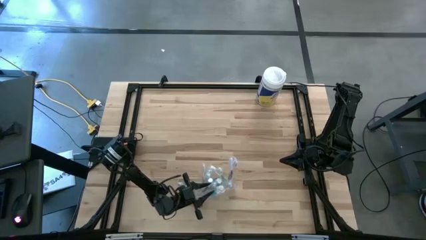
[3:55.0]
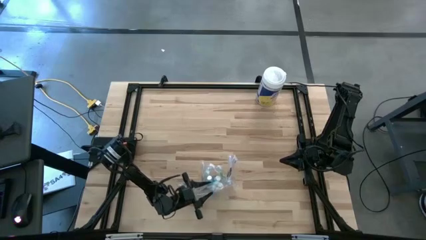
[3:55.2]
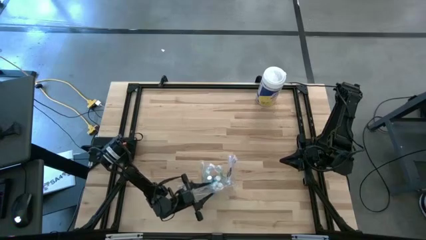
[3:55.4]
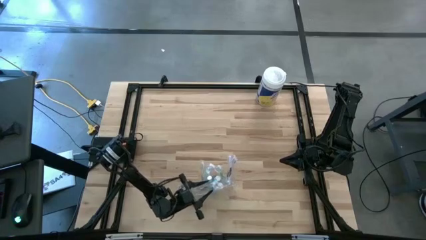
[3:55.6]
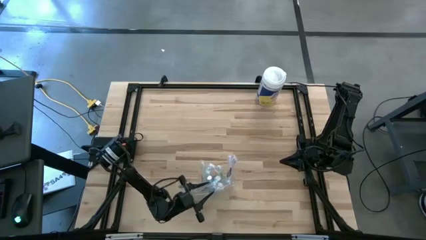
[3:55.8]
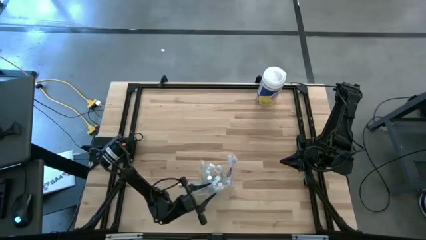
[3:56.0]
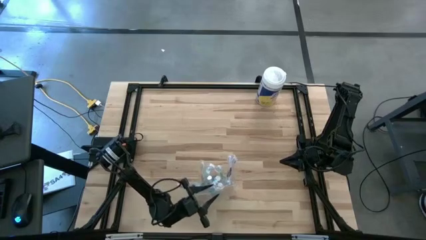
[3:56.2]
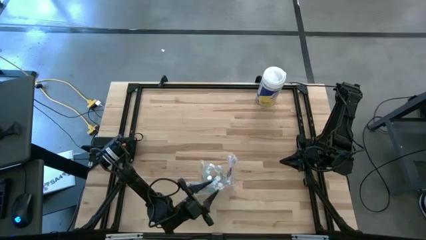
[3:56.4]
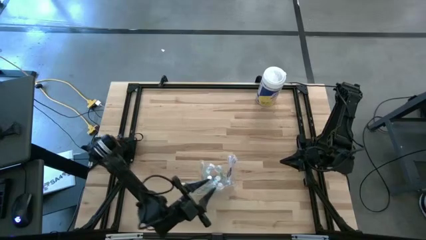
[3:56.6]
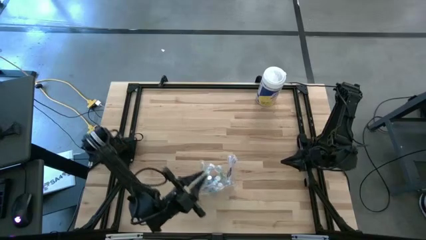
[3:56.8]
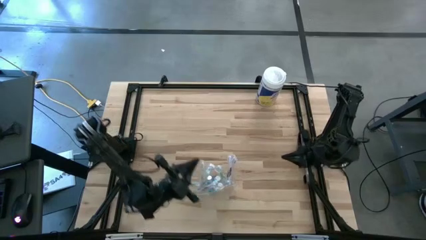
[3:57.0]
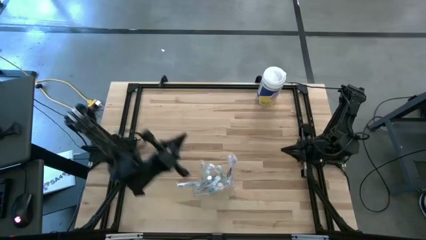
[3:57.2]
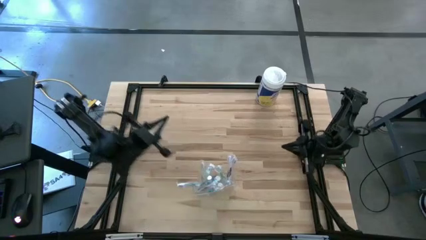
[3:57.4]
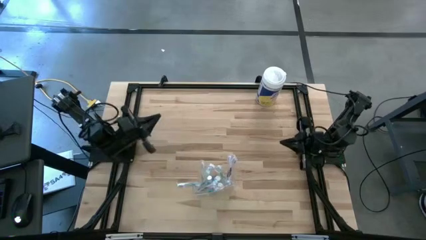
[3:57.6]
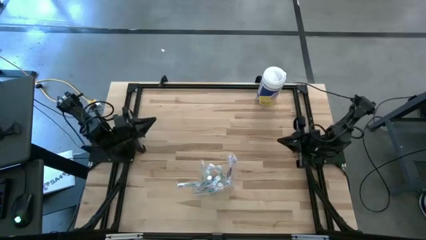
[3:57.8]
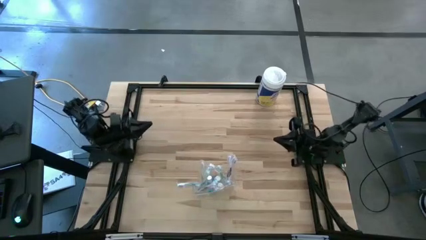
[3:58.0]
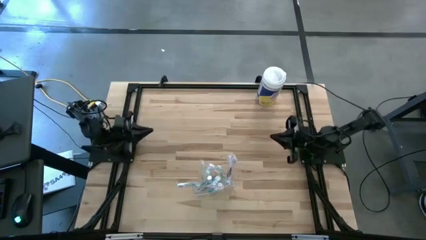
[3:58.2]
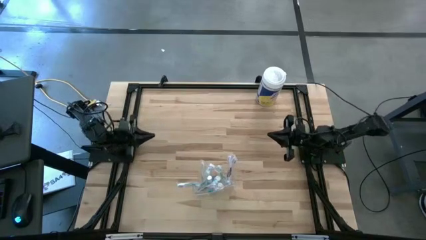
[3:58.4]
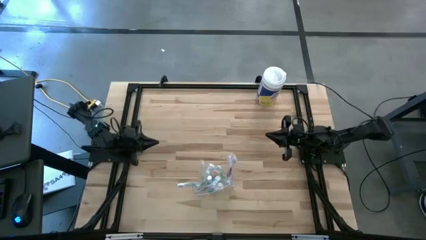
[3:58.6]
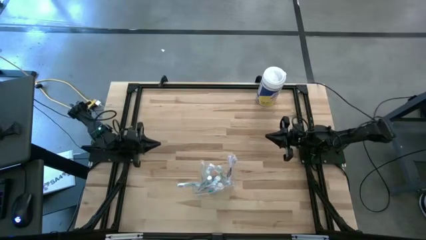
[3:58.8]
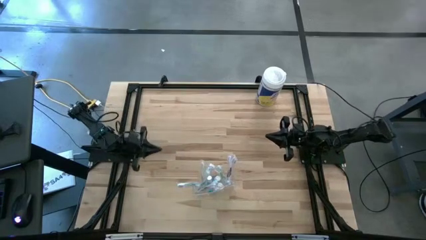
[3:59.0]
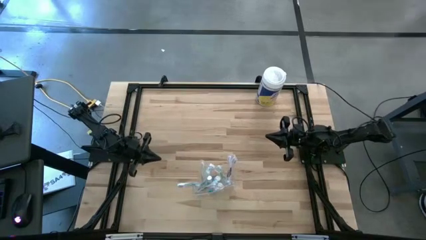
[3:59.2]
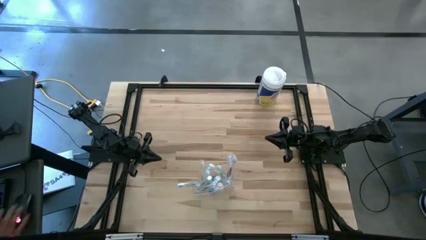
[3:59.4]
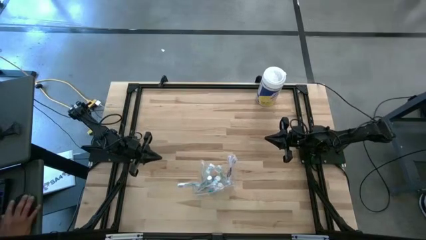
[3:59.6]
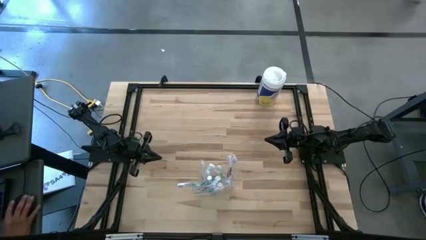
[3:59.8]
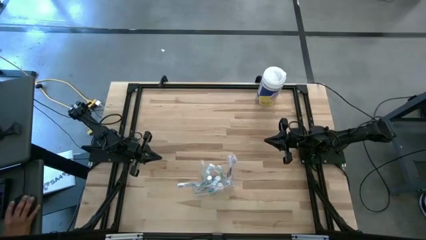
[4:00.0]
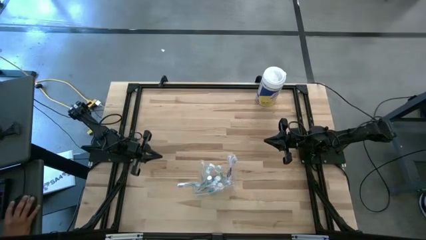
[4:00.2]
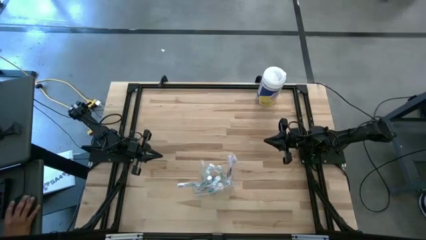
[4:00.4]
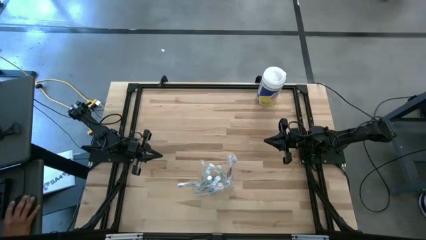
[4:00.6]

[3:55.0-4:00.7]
Task: Pick & Place toothbrushing station
Return to Home Position

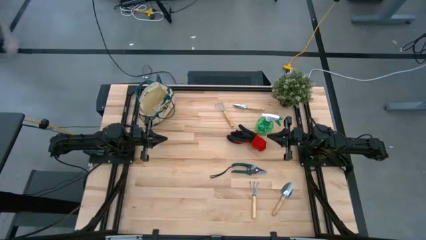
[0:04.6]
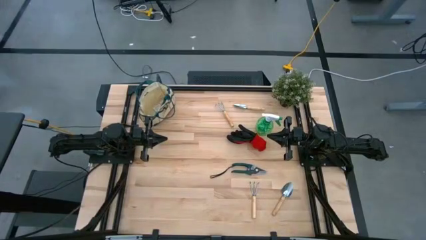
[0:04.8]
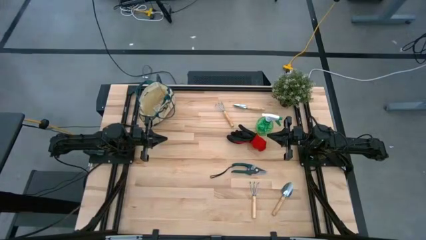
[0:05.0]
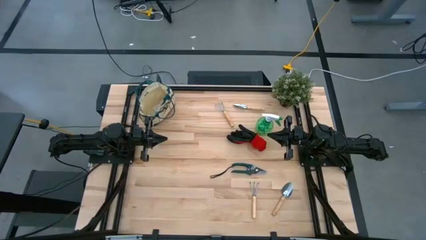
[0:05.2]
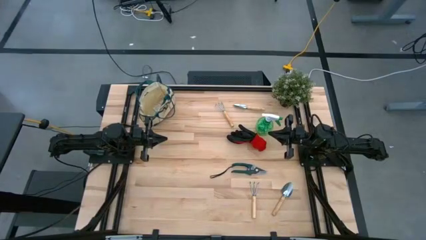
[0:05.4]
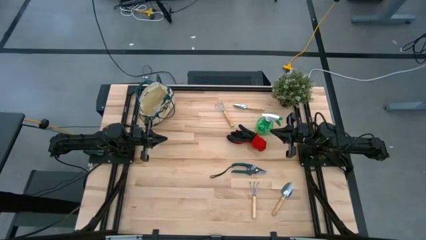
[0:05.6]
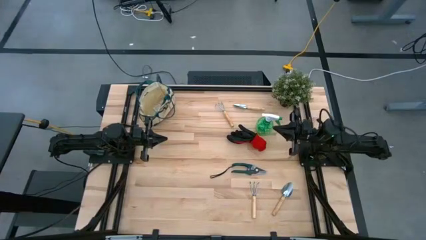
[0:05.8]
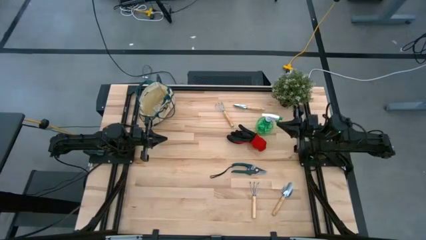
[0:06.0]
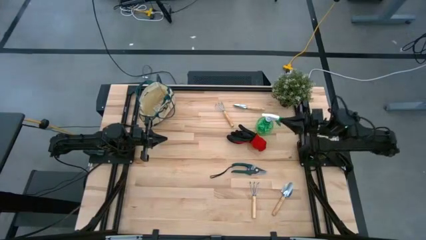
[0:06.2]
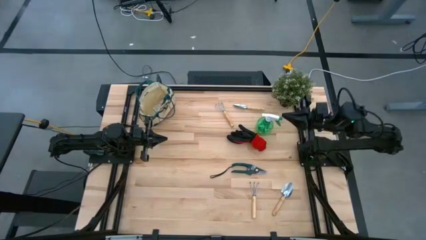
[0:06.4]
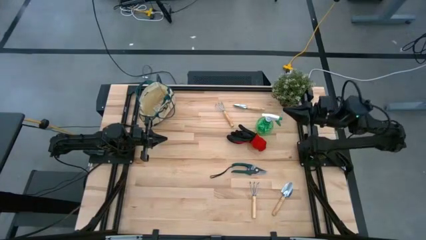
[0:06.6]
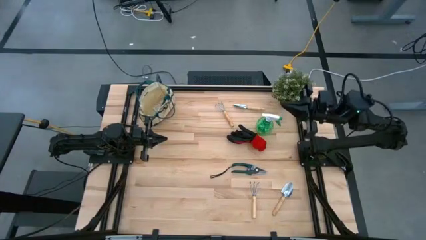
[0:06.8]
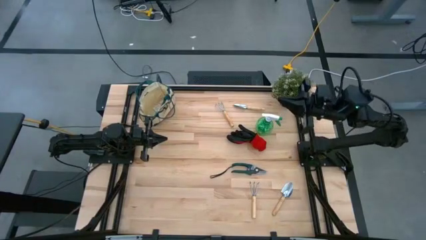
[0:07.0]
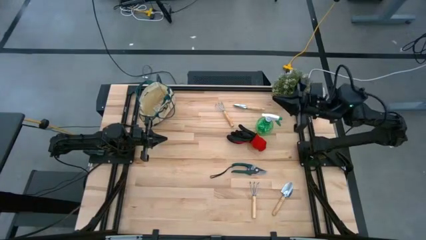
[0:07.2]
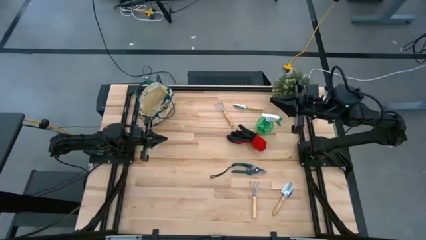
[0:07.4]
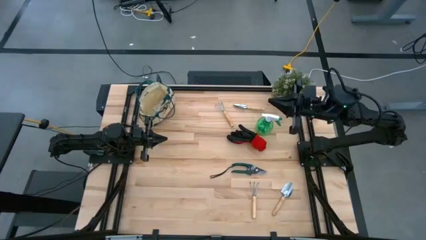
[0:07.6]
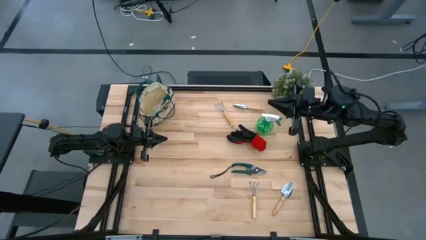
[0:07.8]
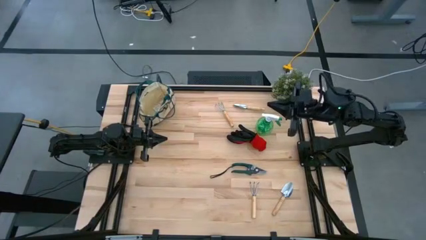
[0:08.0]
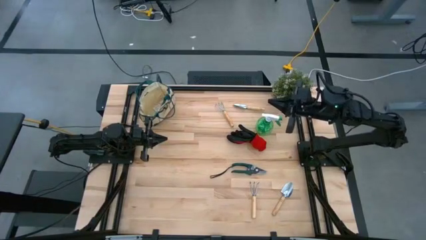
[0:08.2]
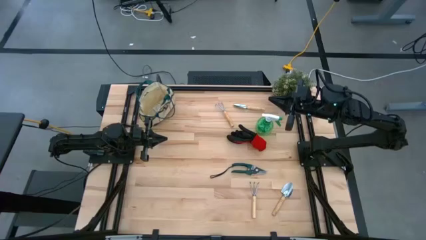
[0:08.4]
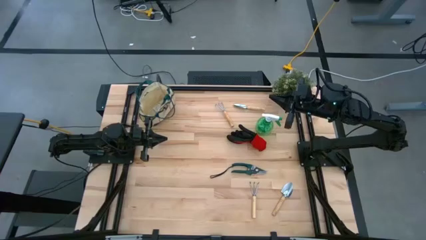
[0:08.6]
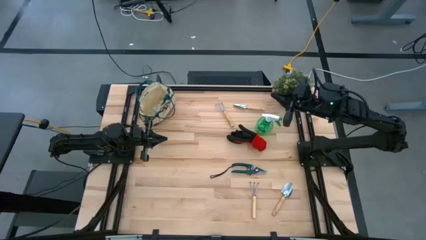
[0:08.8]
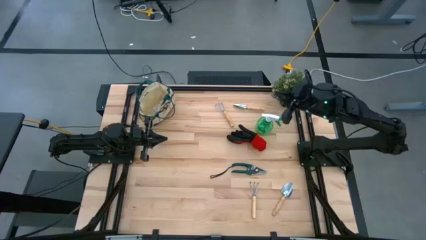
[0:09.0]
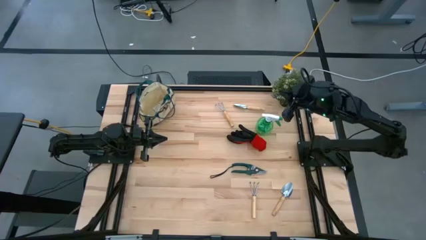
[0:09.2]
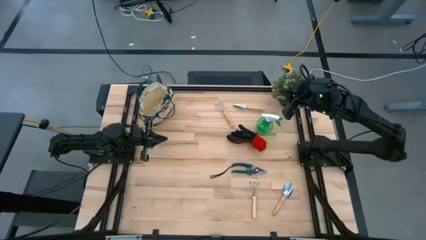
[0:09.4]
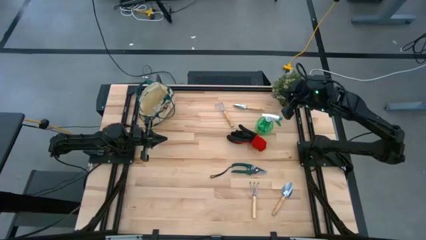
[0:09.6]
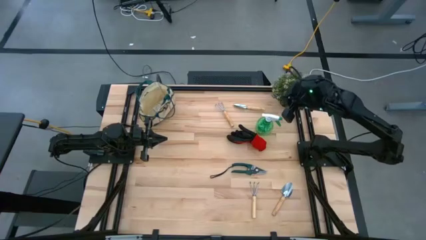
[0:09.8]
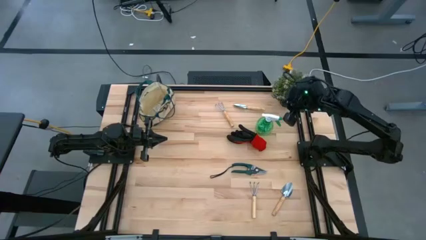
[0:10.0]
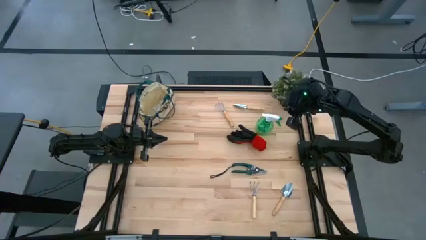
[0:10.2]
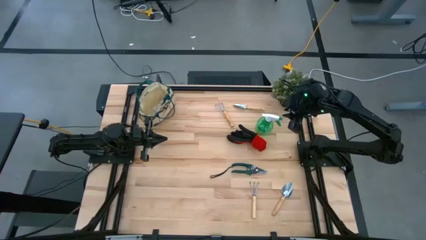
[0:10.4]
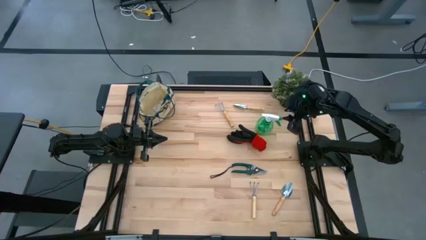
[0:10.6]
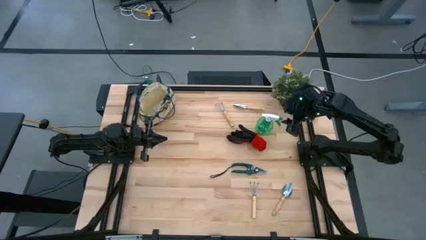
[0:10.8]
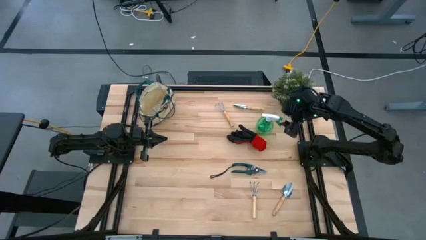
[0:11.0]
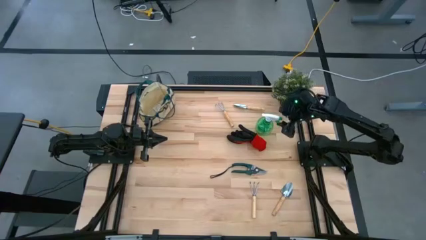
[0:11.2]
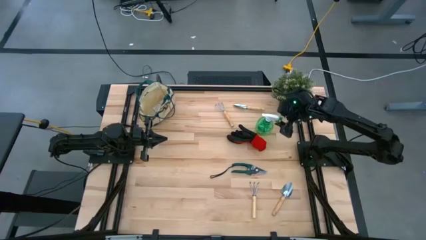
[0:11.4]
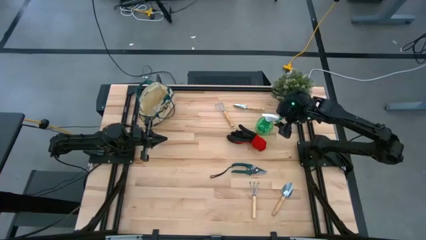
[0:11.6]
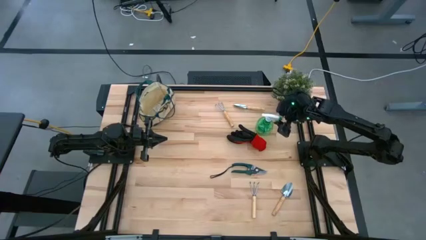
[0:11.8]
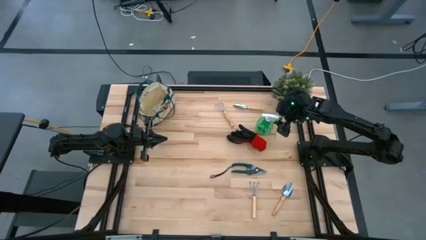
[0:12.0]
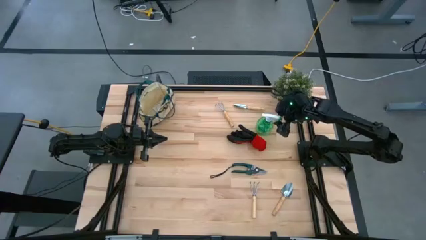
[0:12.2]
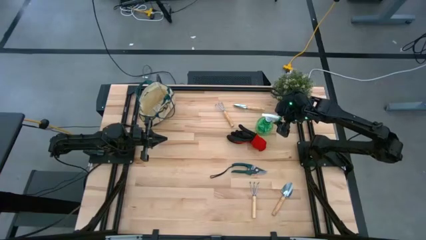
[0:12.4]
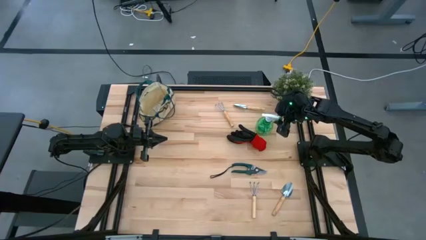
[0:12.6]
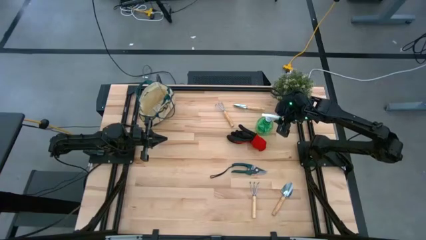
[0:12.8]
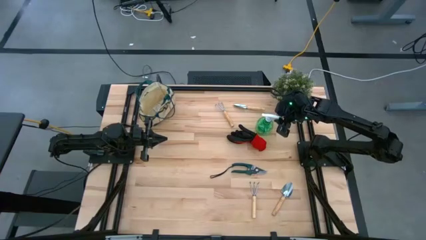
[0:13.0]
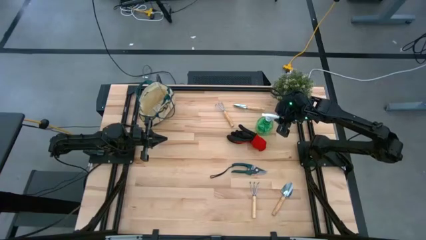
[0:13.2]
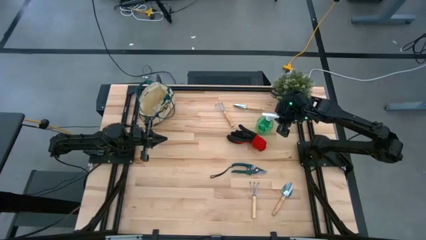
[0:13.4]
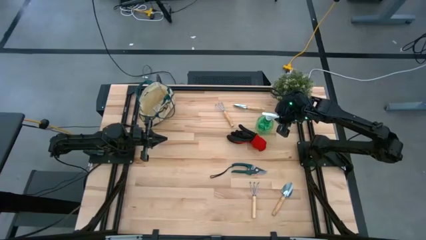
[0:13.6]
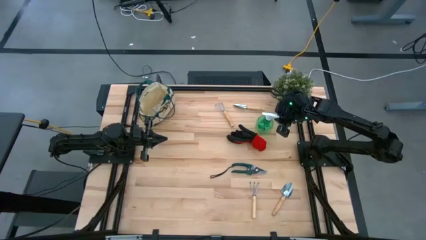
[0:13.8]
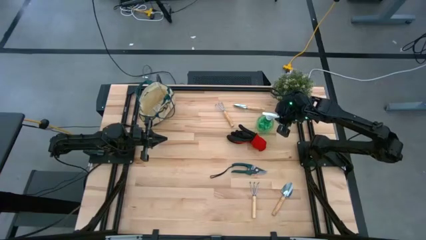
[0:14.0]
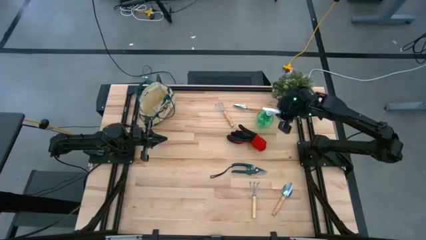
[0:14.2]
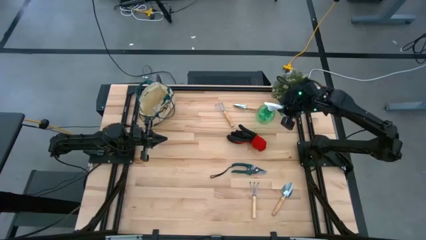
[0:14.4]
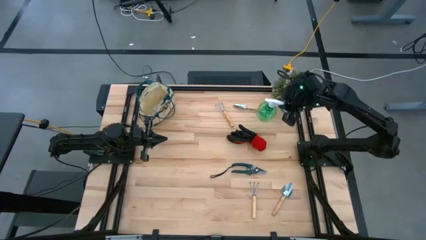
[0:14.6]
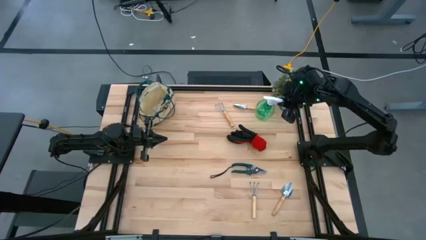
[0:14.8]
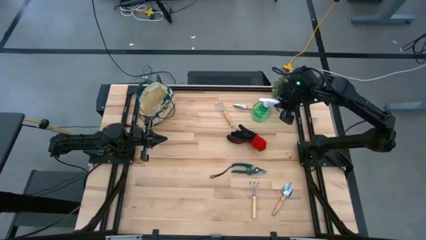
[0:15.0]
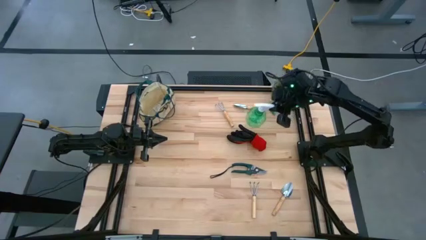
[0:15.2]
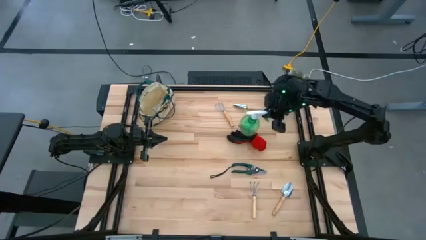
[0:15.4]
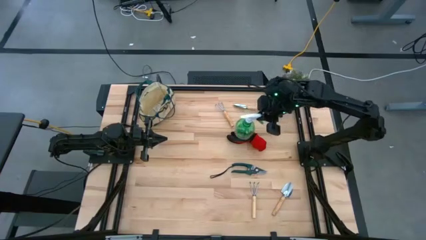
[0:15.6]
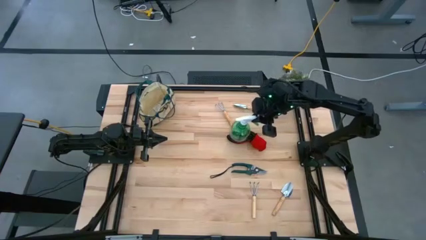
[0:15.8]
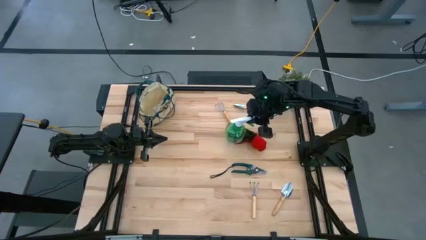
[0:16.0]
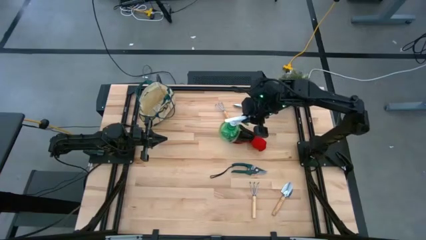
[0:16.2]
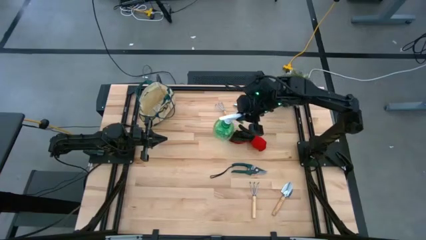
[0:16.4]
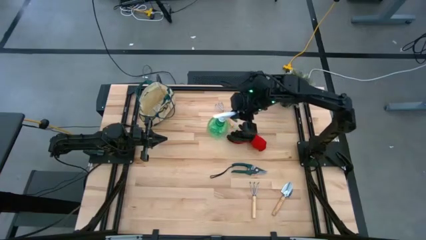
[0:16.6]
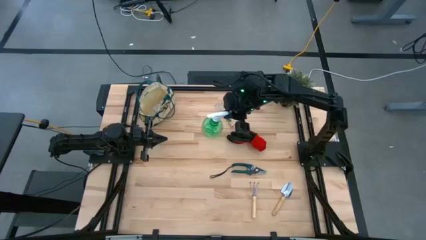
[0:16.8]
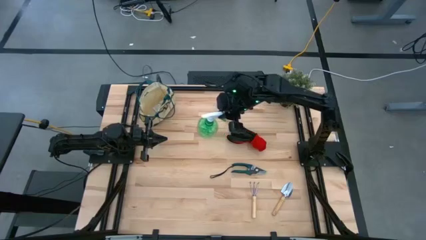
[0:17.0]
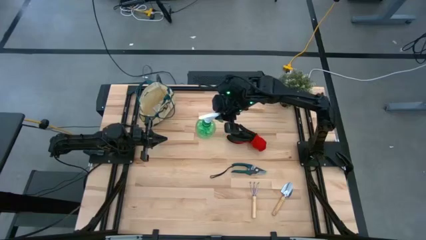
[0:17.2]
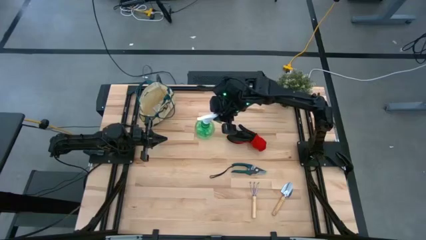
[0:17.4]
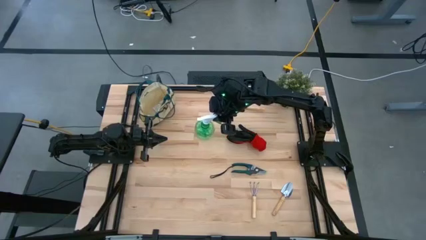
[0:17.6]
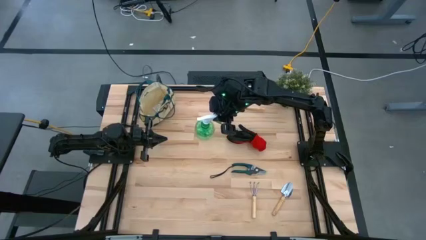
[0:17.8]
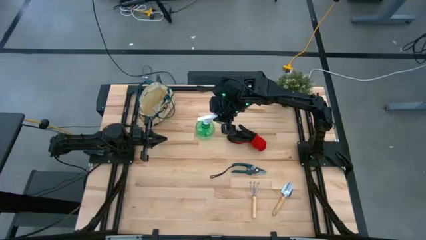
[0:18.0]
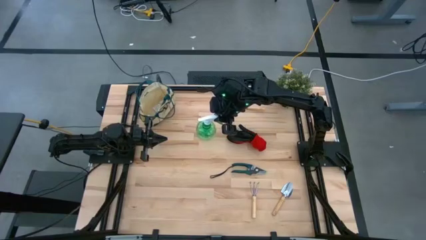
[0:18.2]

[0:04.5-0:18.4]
Task: Pick & Place Garden tools in Gardening bag
Put the green spray bottle into the gardening bag
